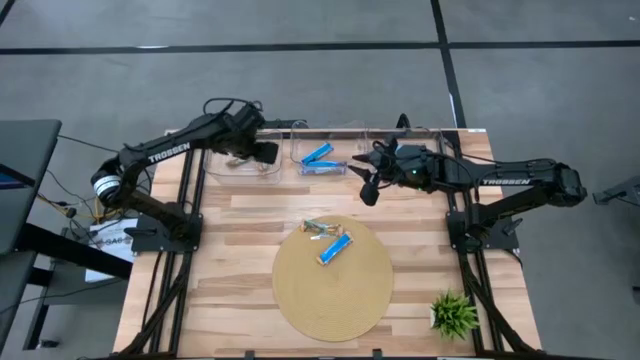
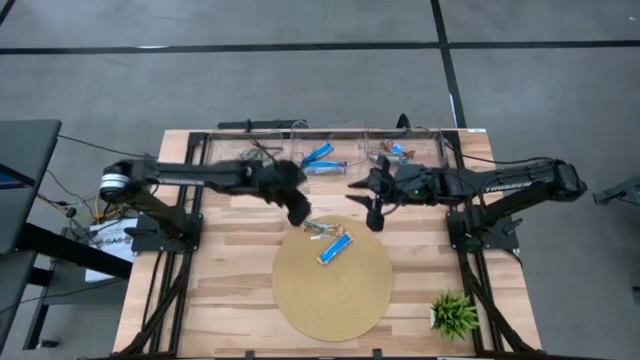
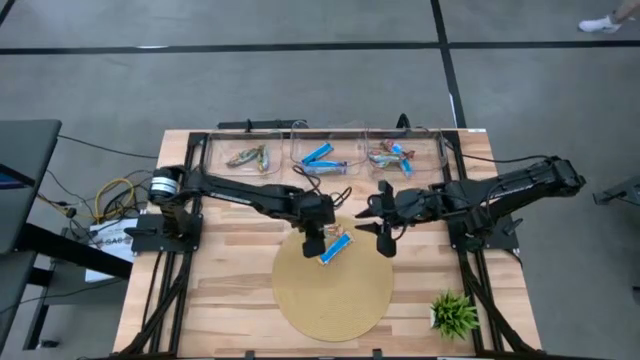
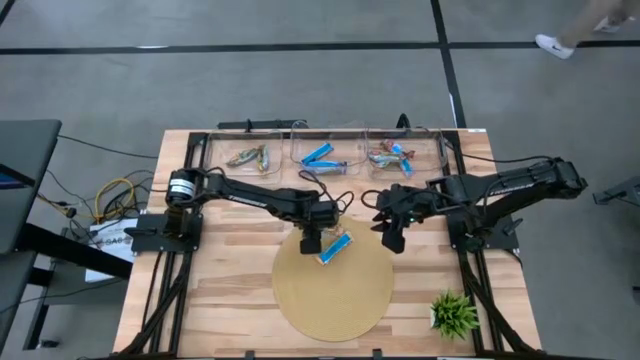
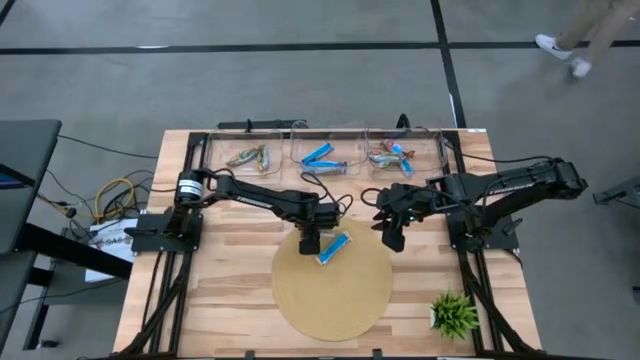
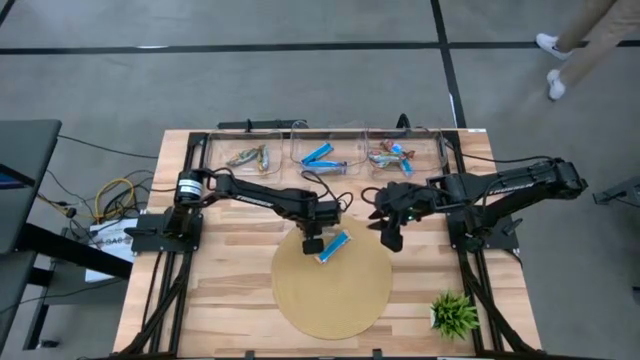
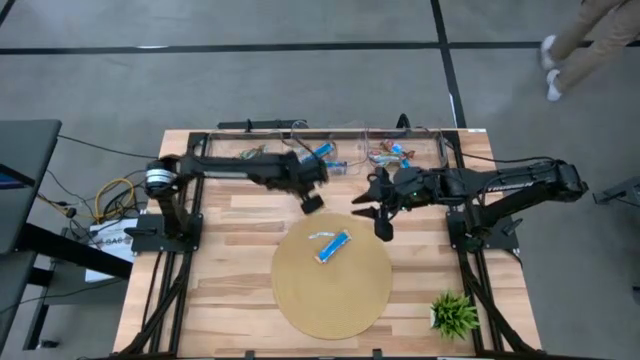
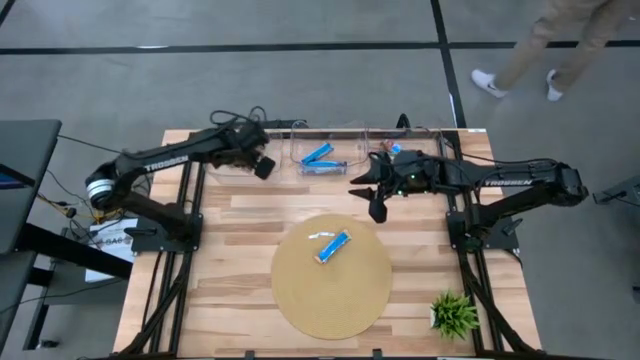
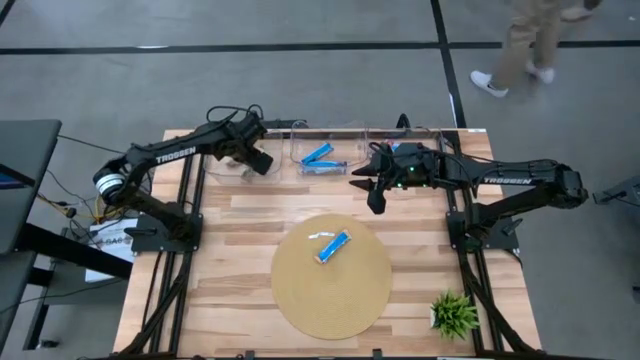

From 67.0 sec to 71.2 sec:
Task: Pick and place Granola Bars by type
Put the orange granola bar into the left transparent bin

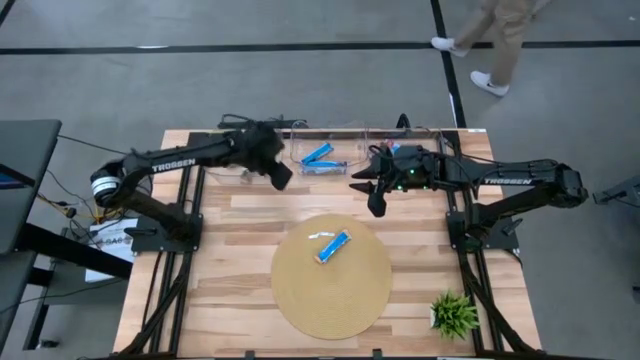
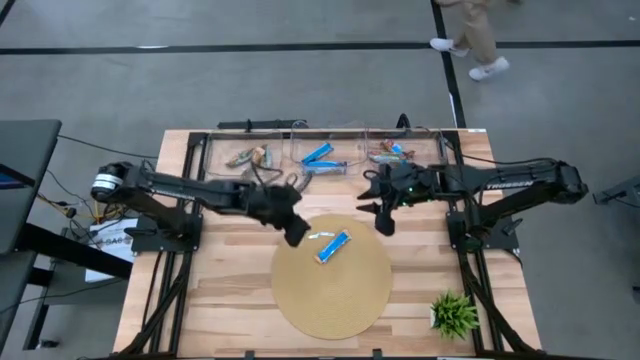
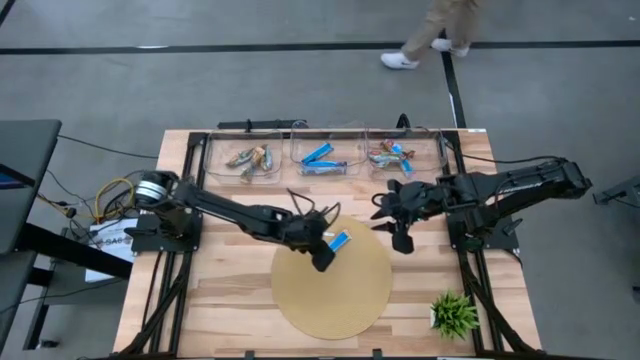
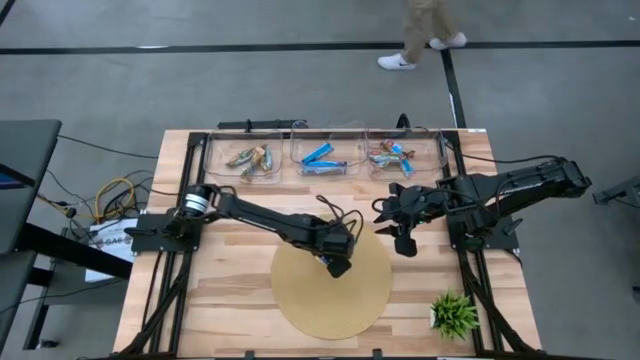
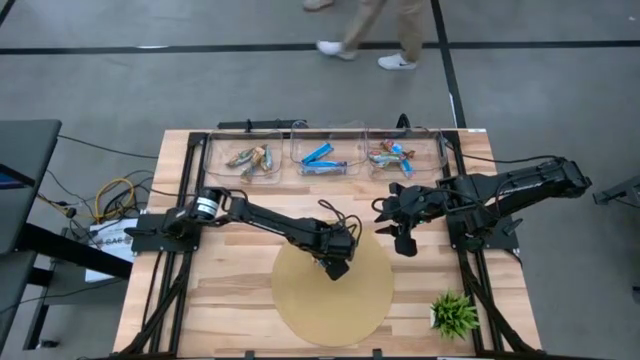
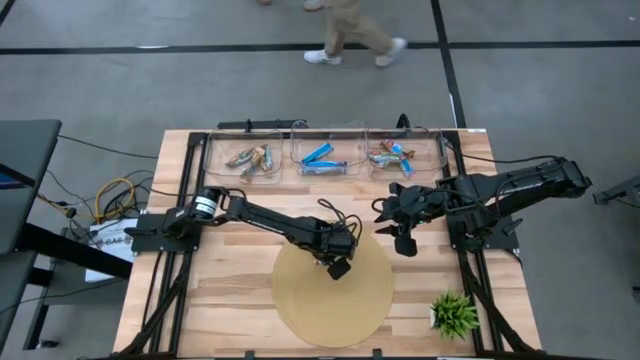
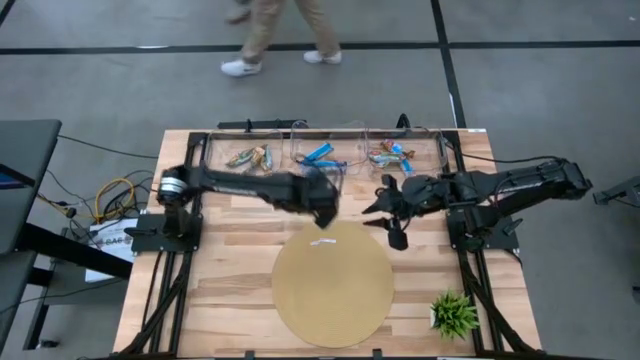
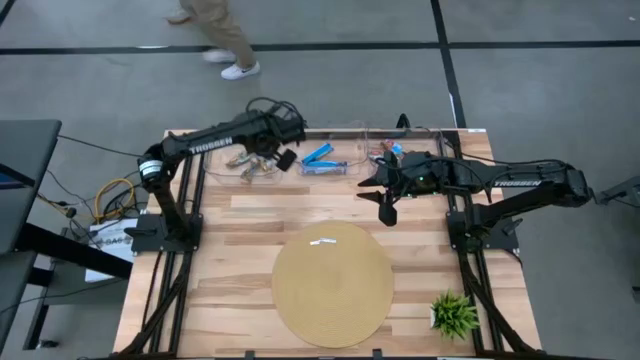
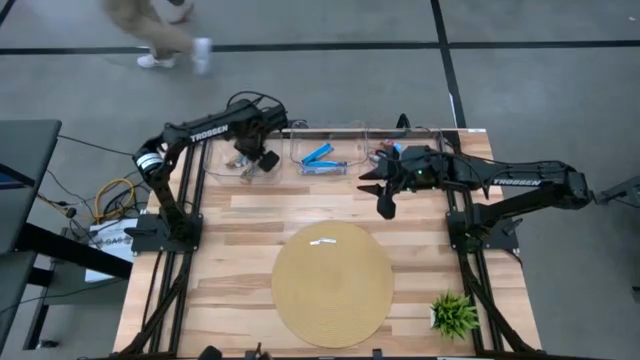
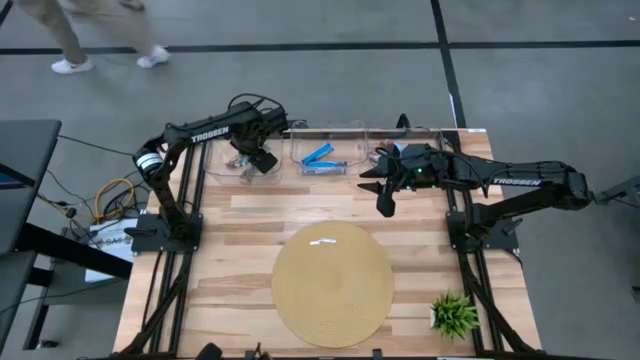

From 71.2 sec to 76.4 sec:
Put the orange granola bar into the left transparent bin

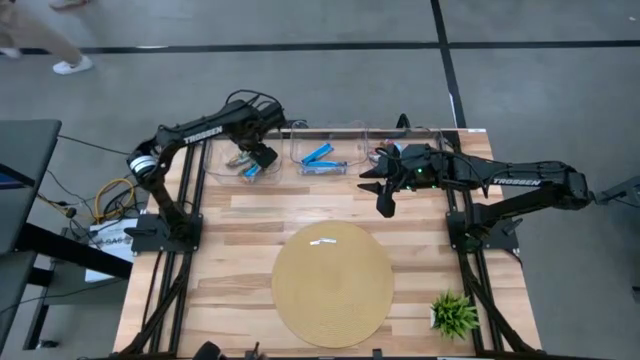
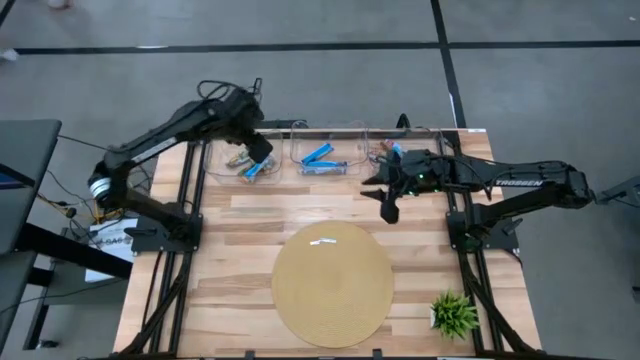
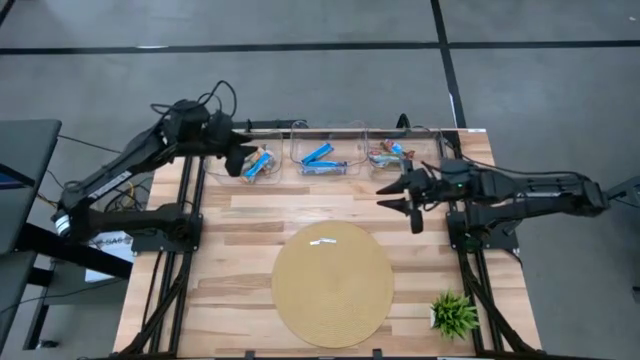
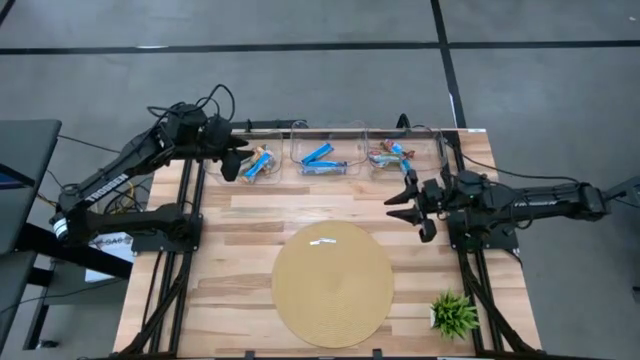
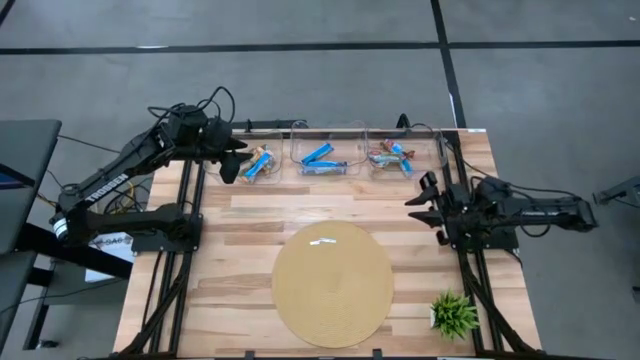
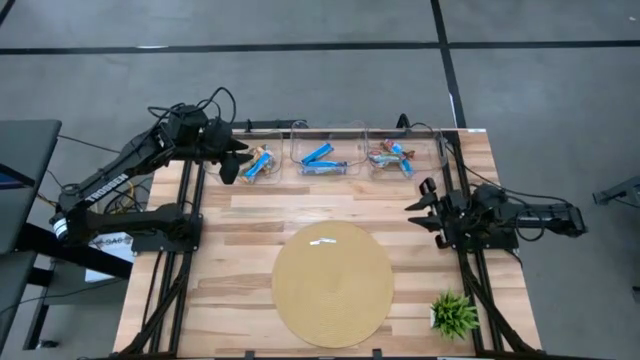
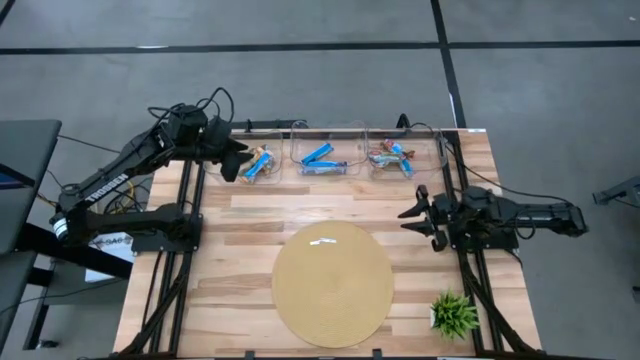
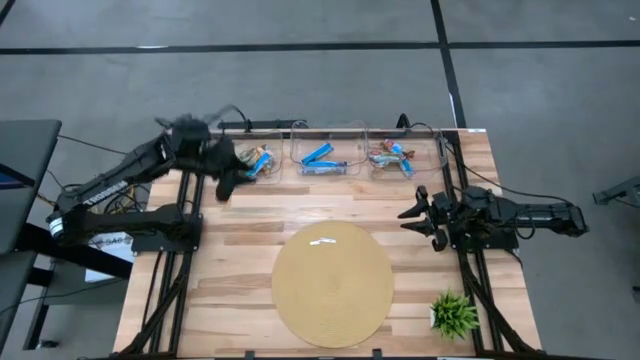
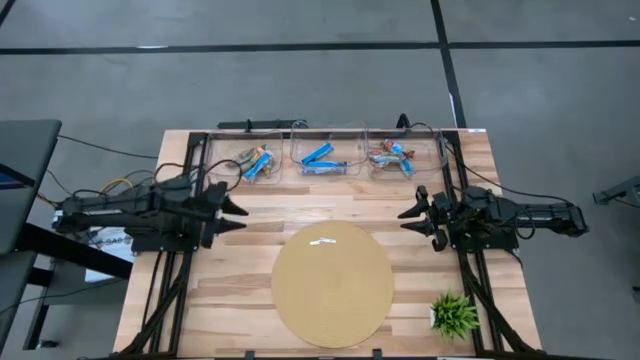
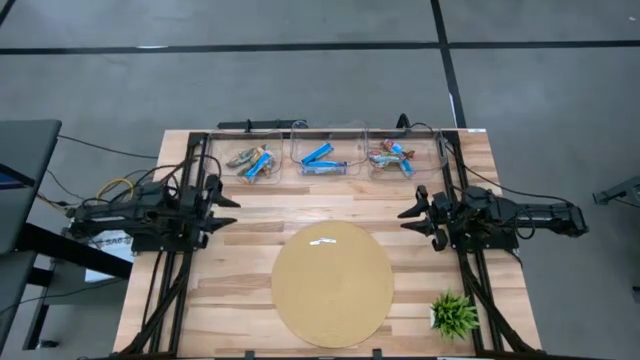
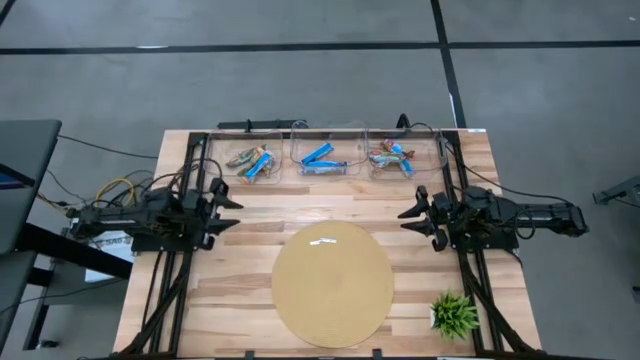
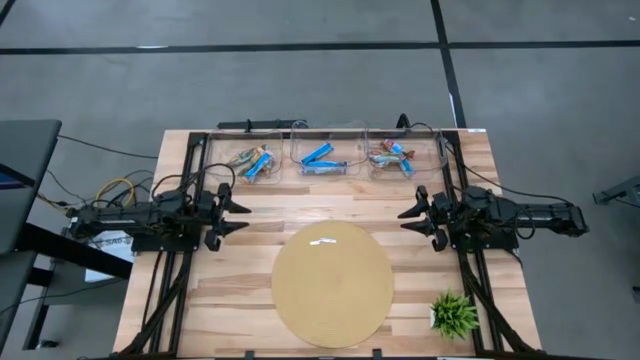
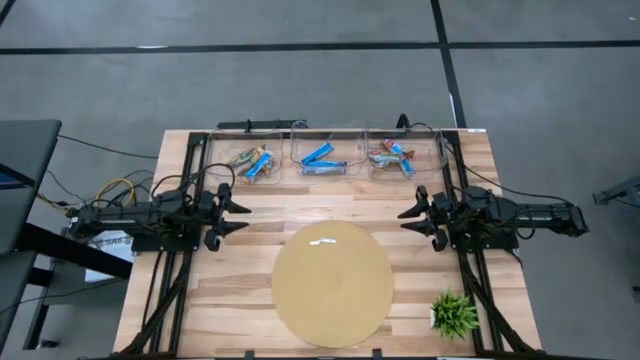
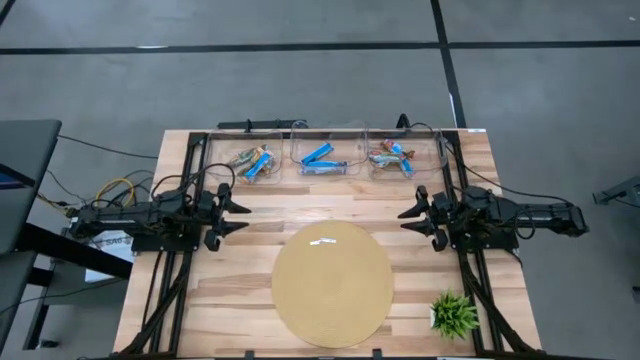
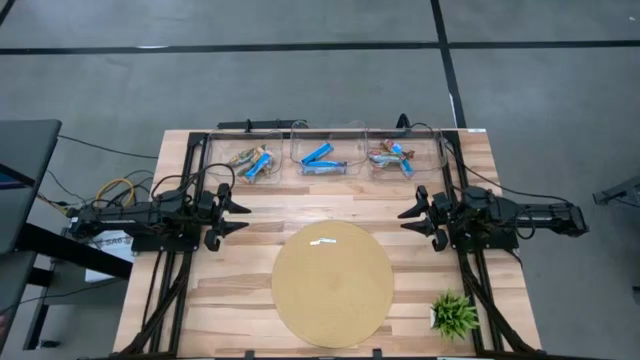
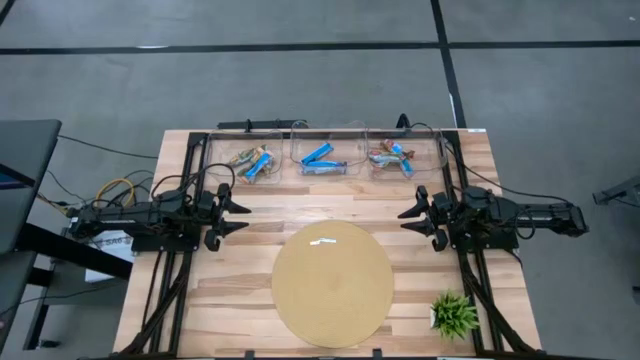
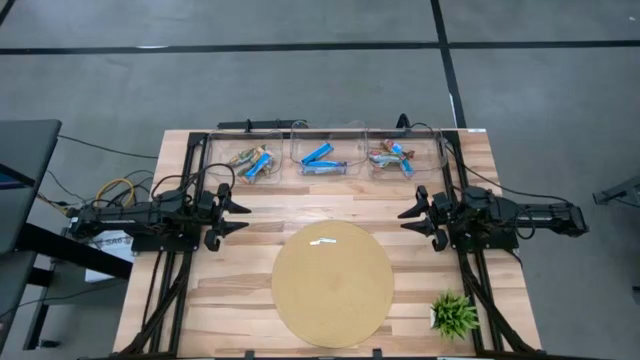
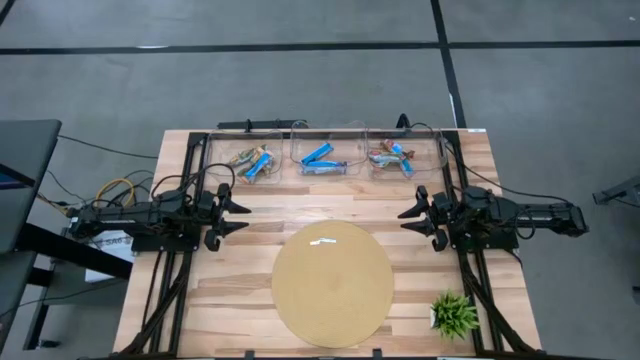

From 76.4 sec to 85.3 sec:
Return to Home Position

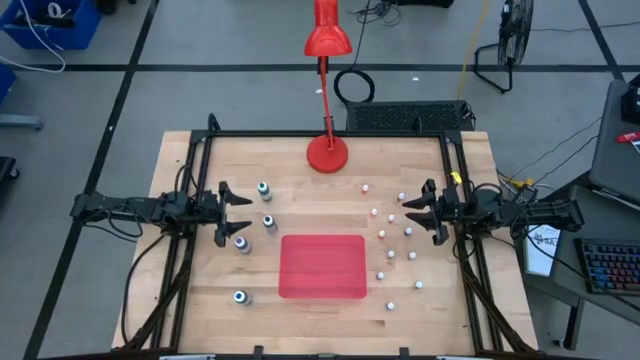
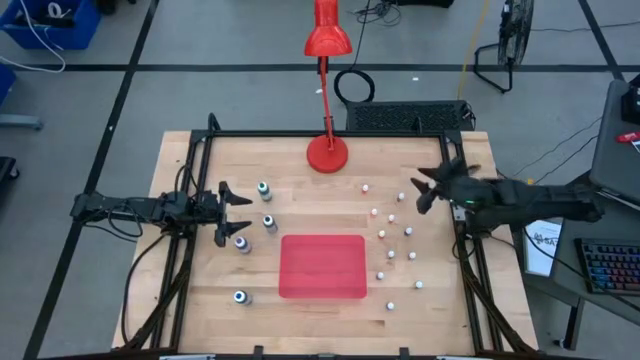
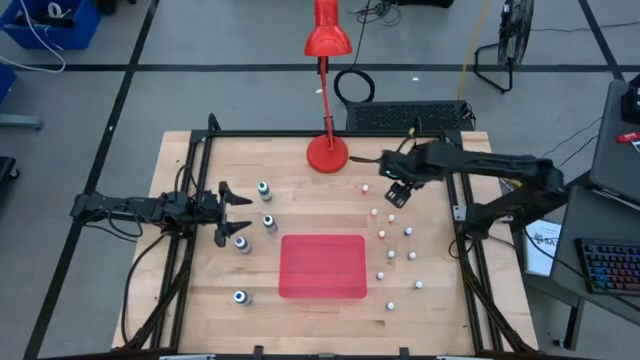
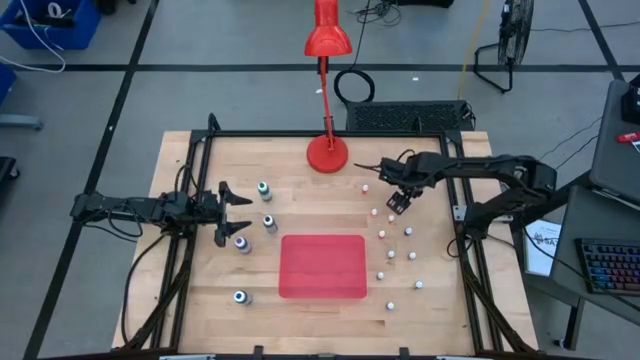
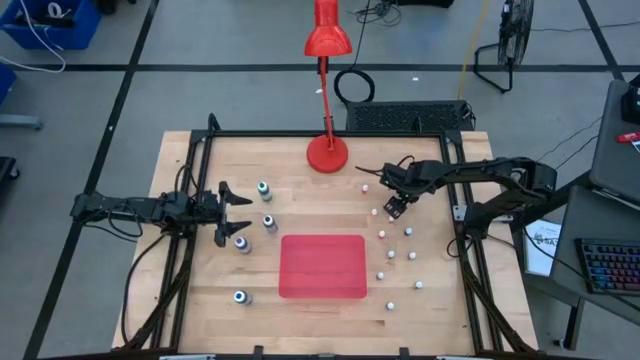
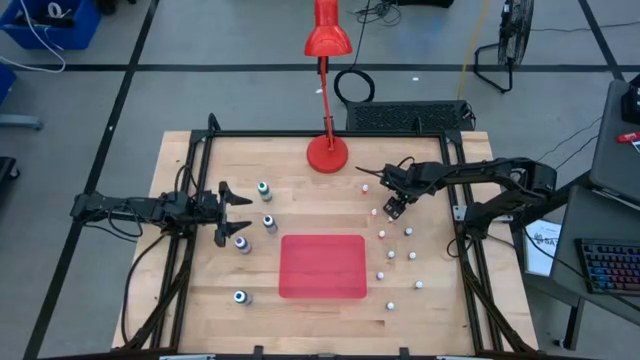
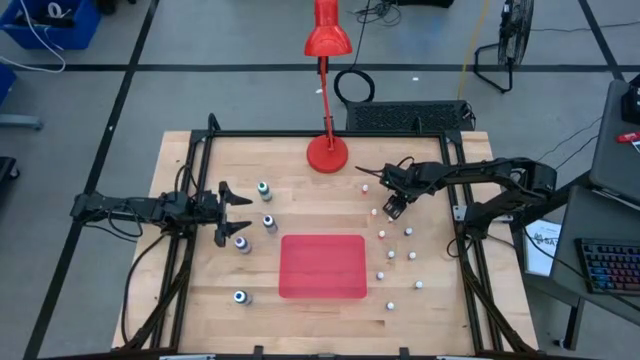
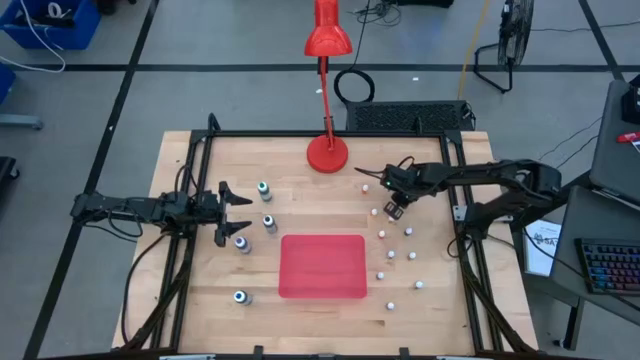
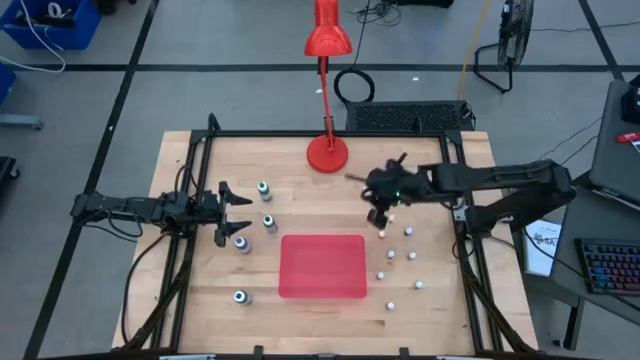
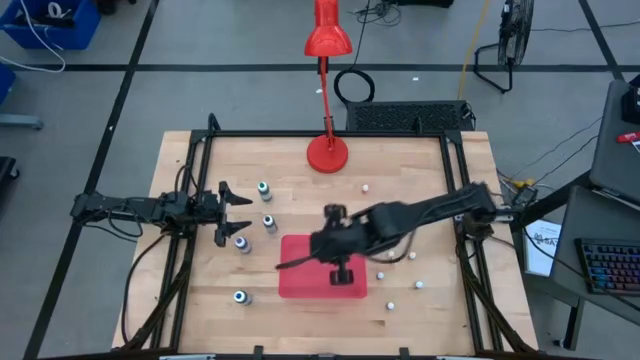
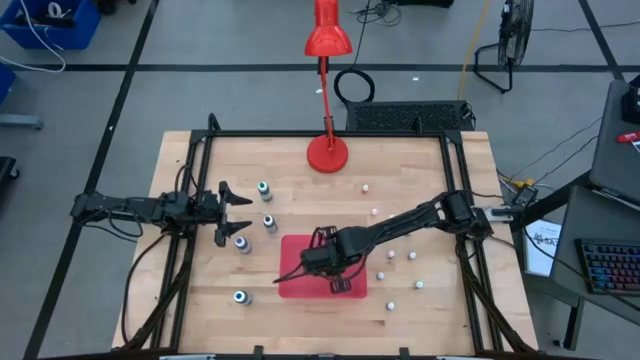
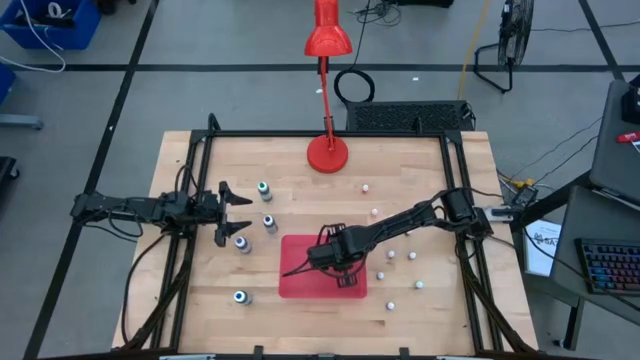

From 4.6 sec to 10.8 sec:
Task: Pick & Place food coloring
Put the small red food coloring bottle into the pink container
